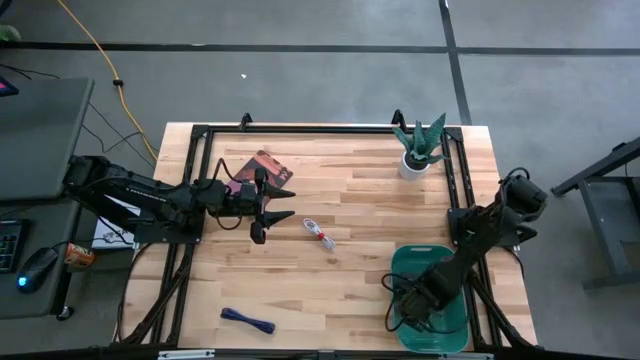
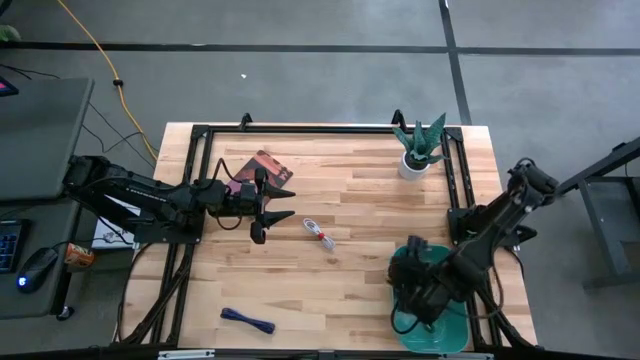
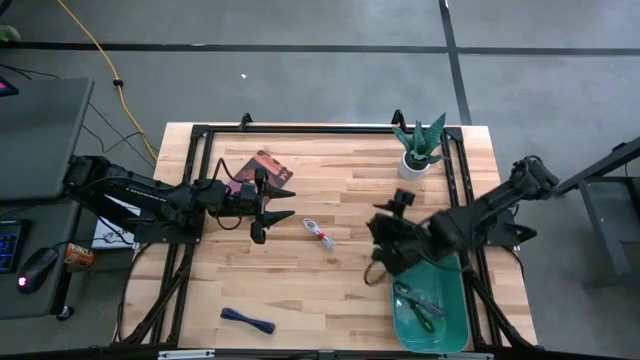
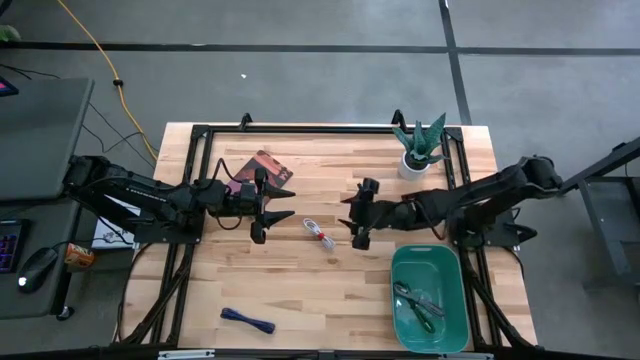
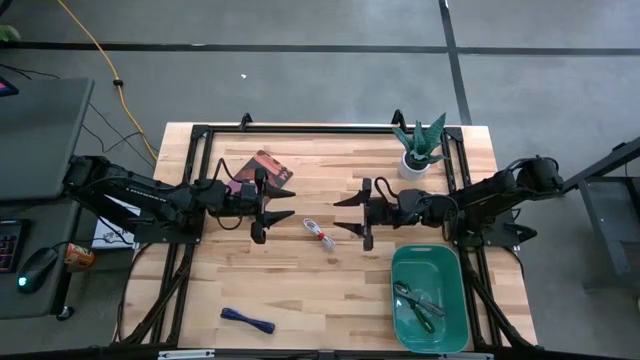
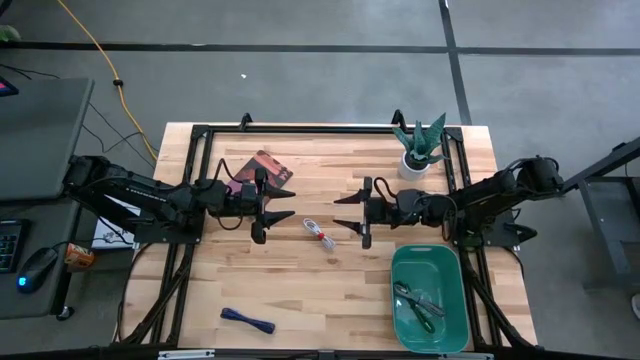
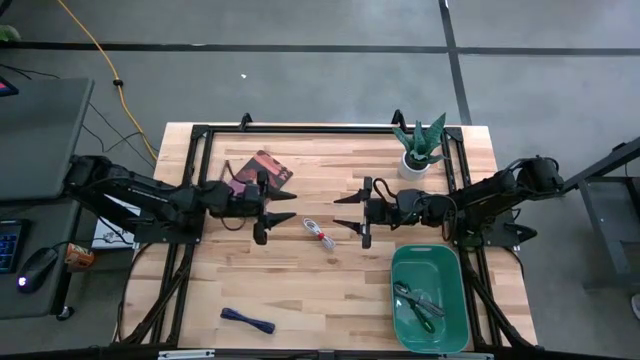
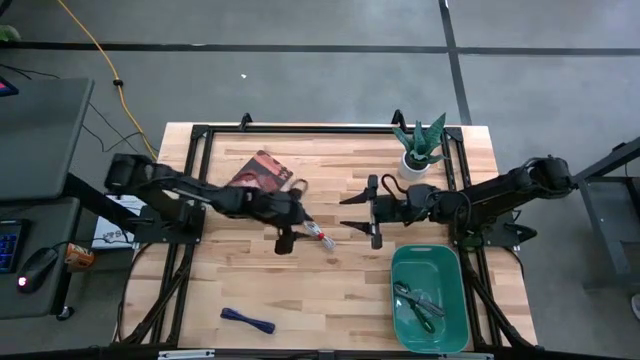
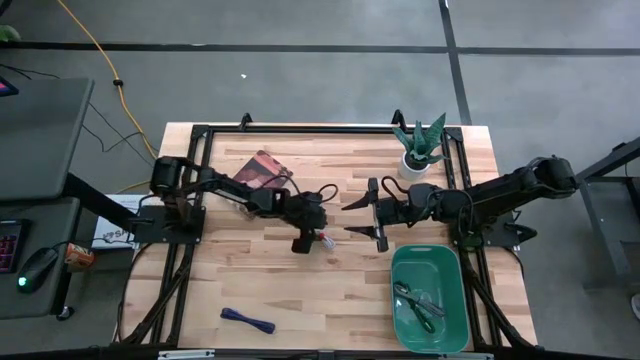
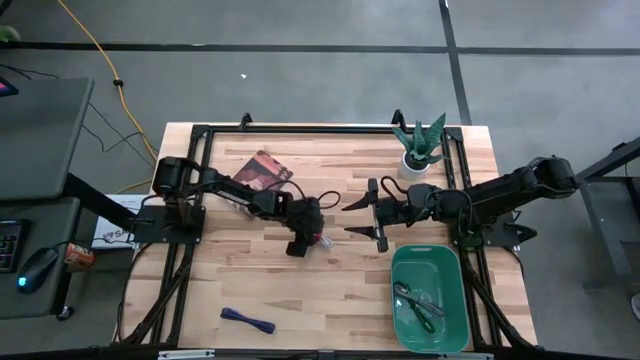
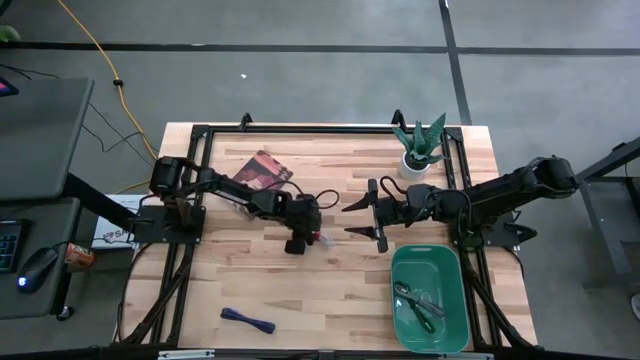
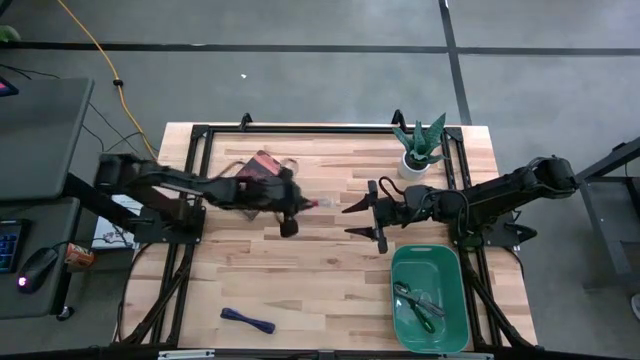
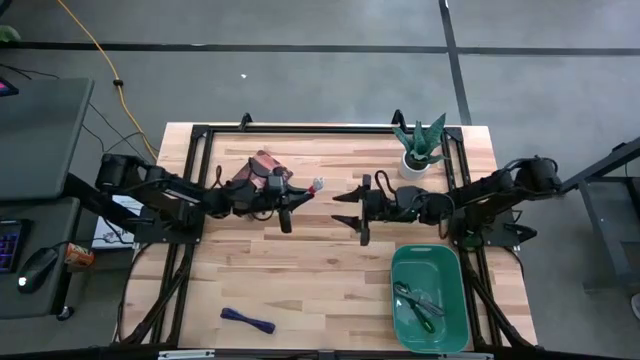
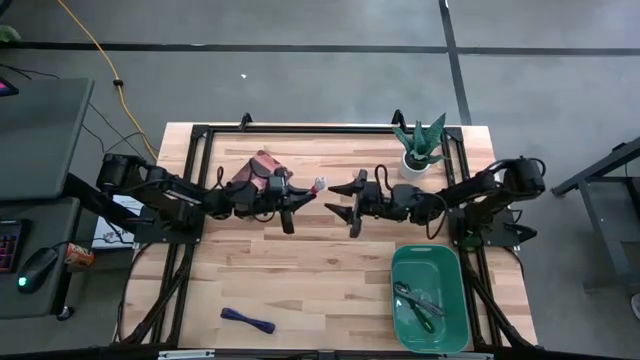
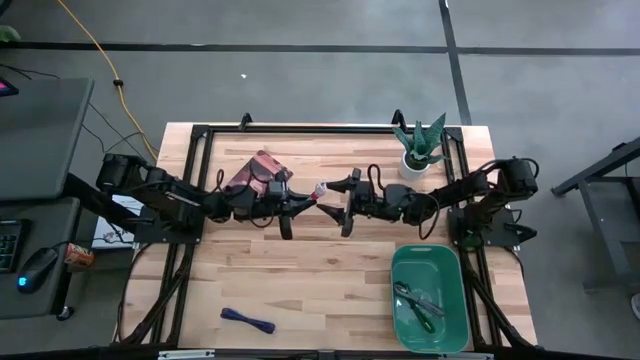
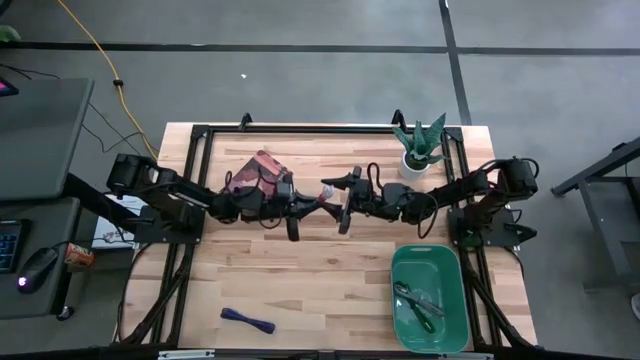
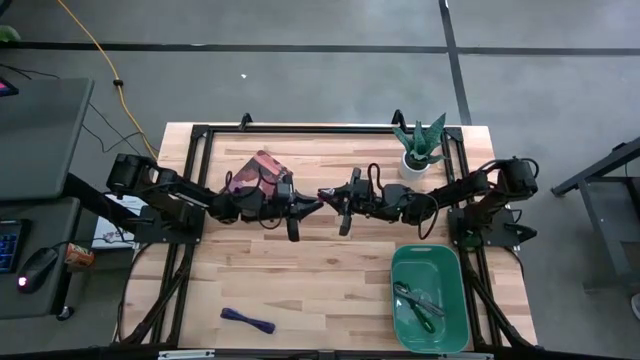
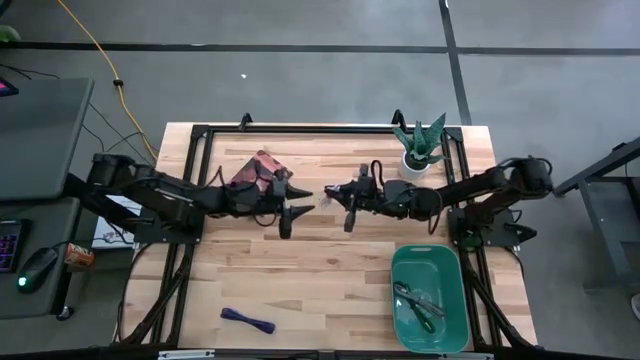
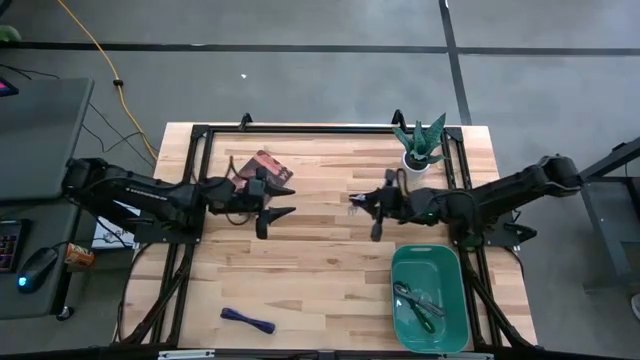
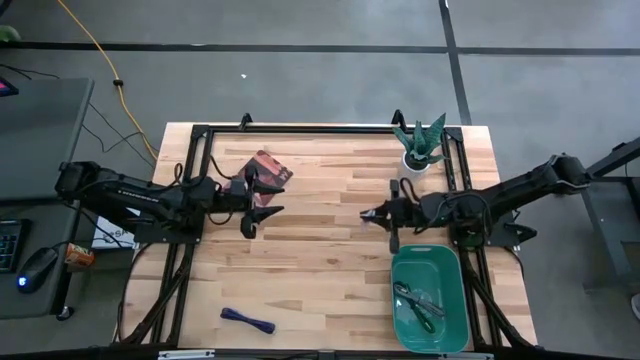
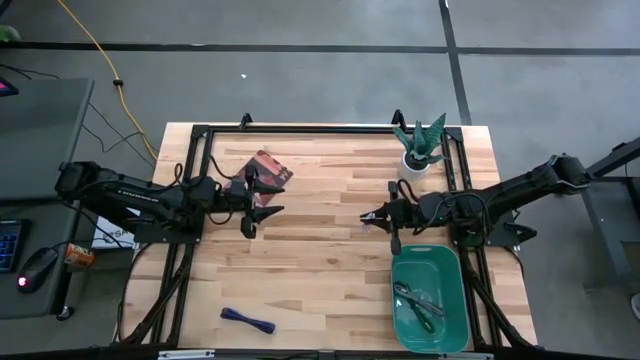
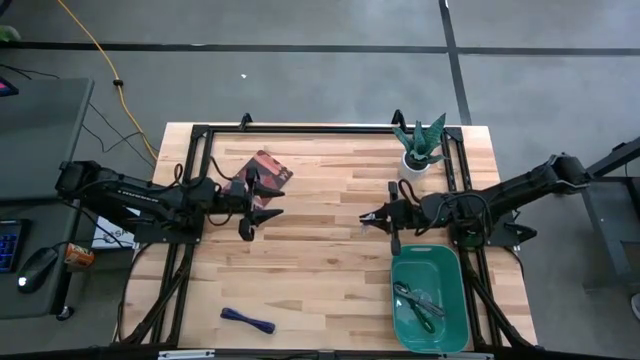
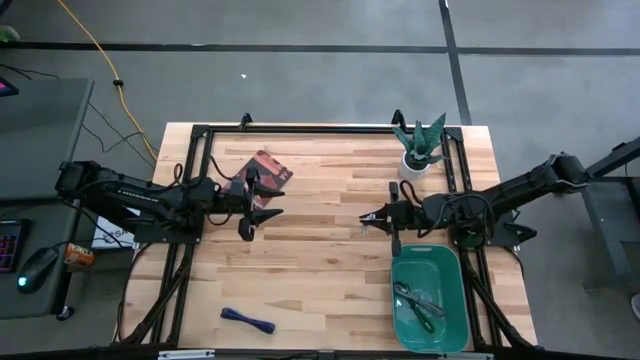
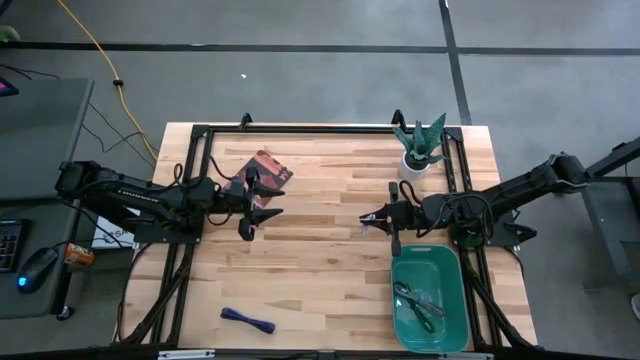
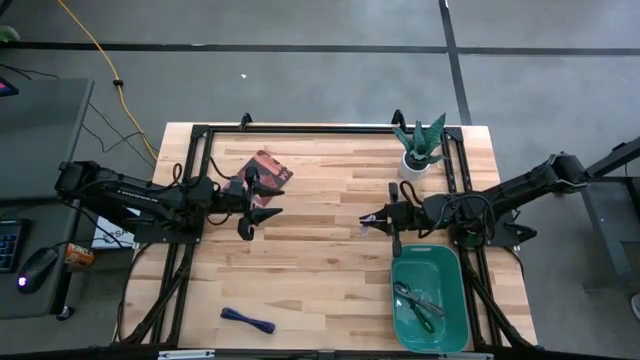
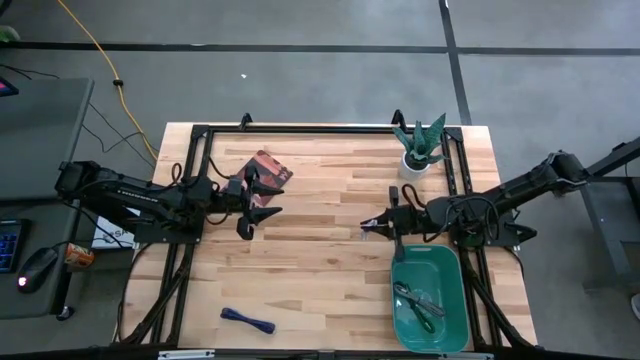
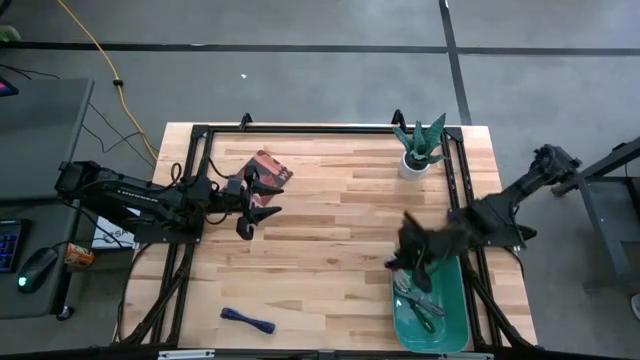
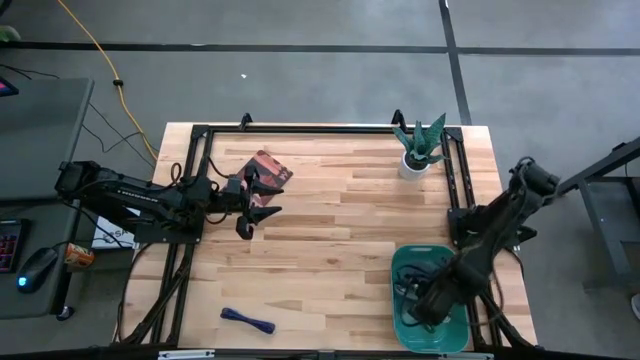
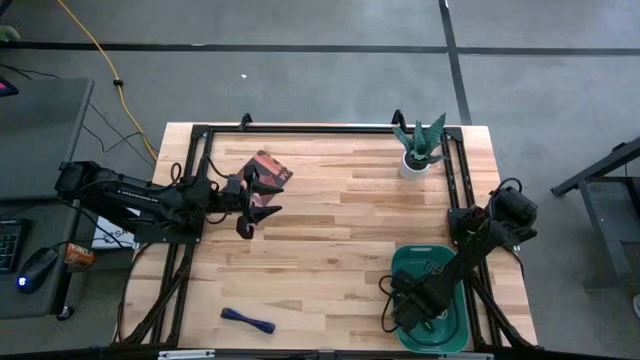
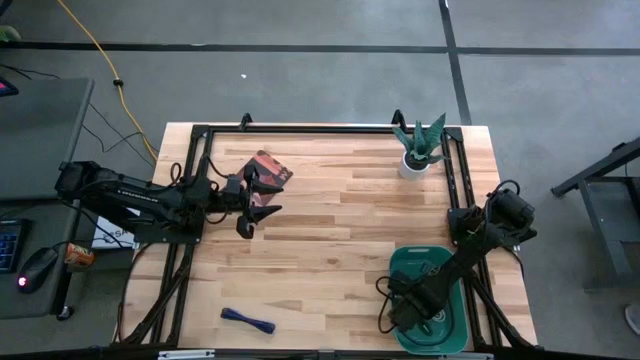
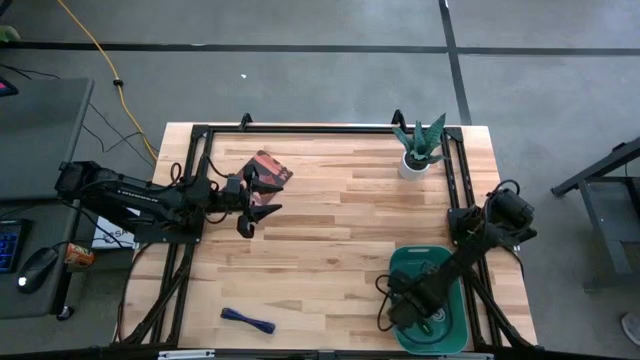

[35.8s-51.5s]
Task: Pick and place USB-C Cables
Put the white USB cable into the bin

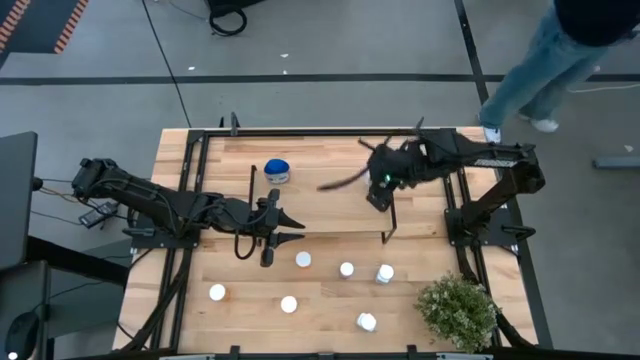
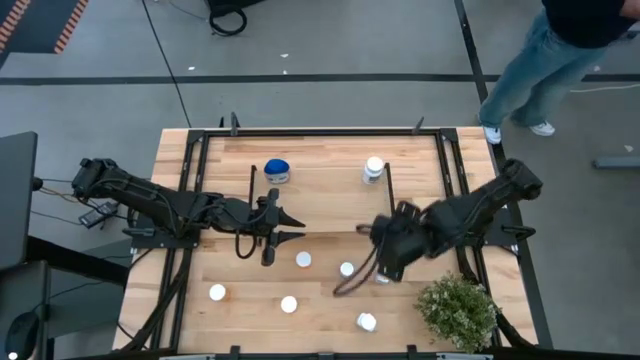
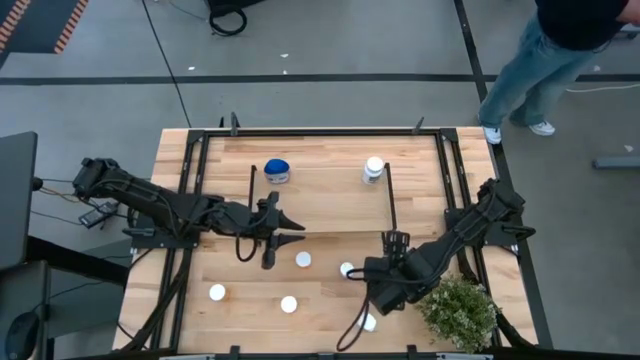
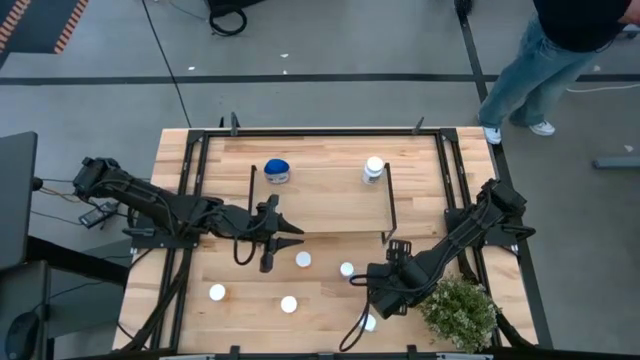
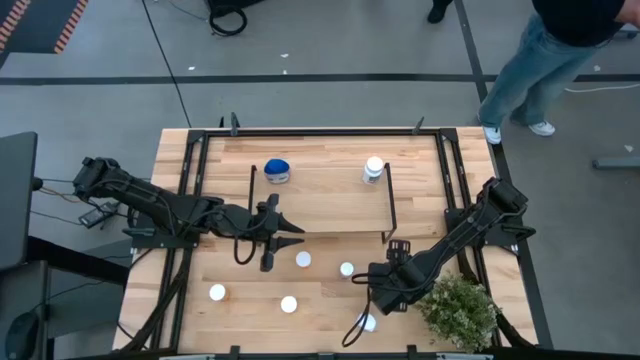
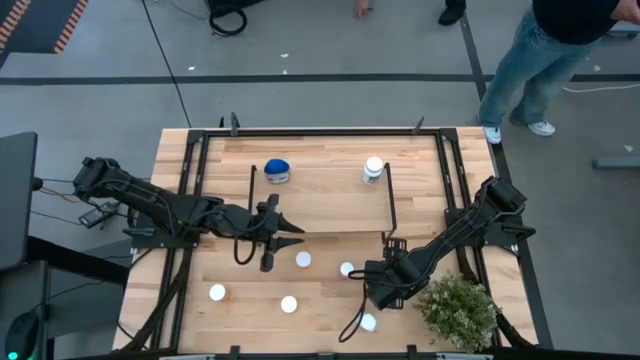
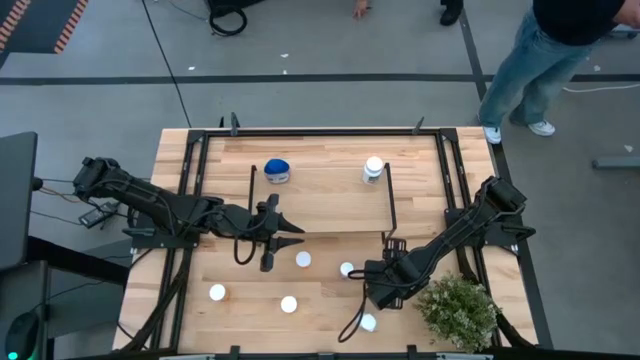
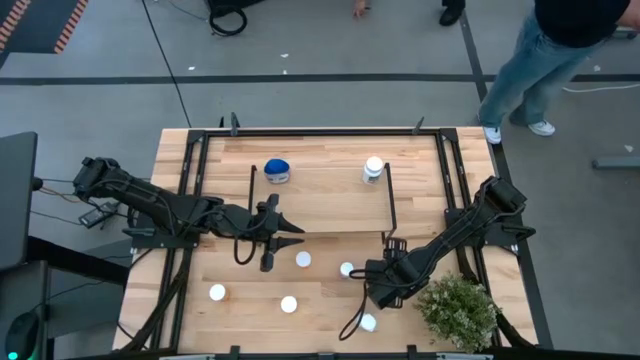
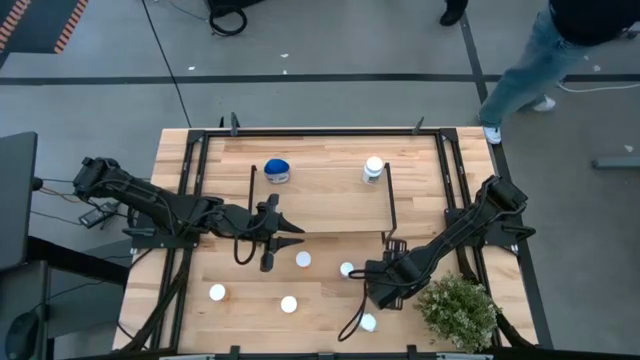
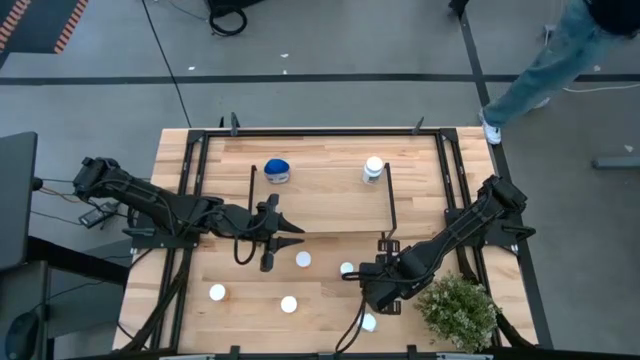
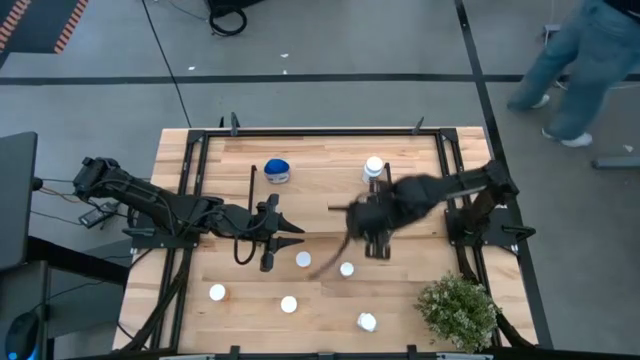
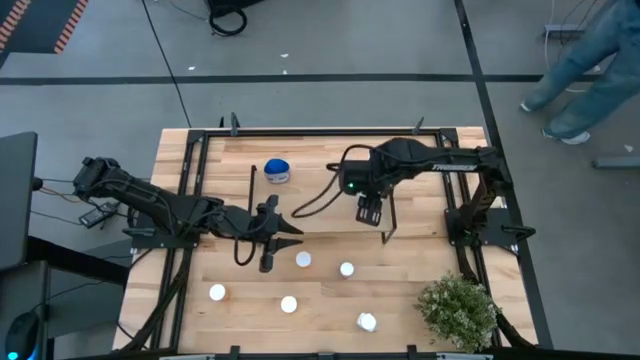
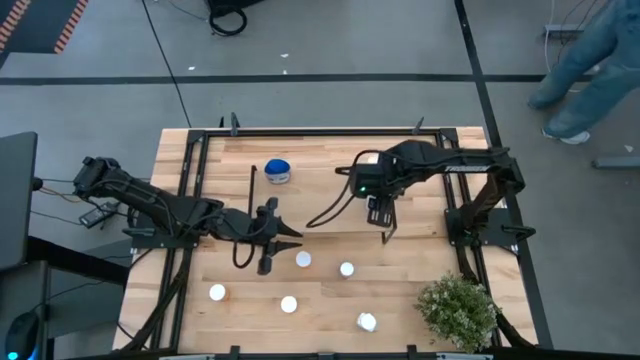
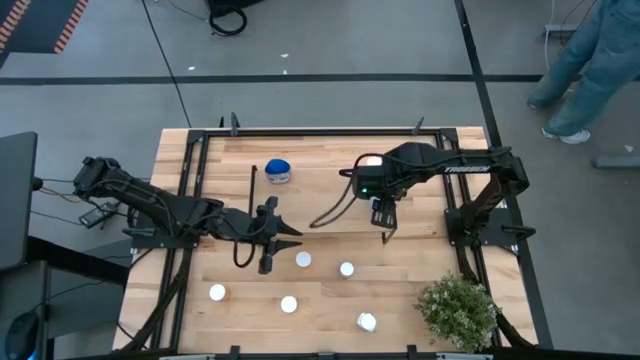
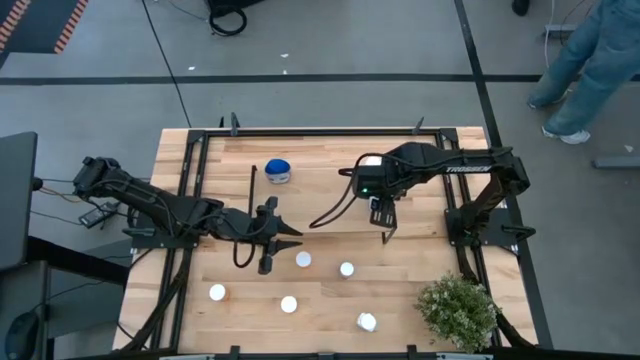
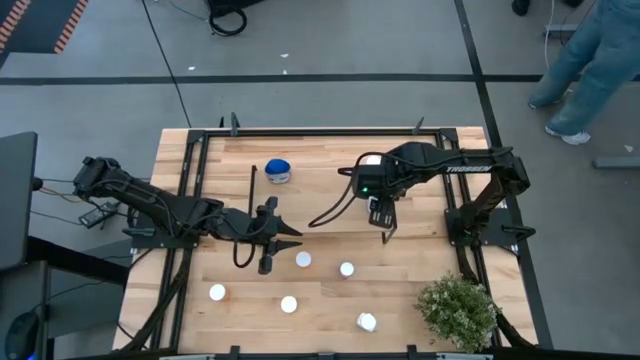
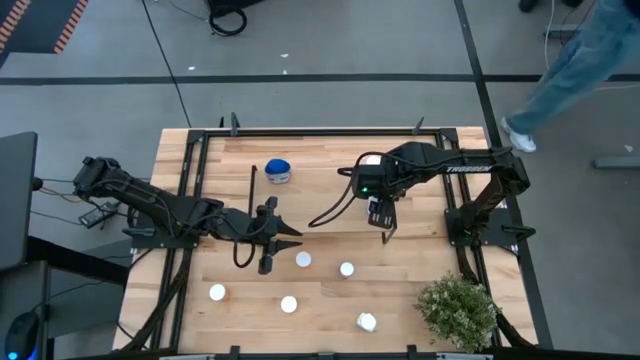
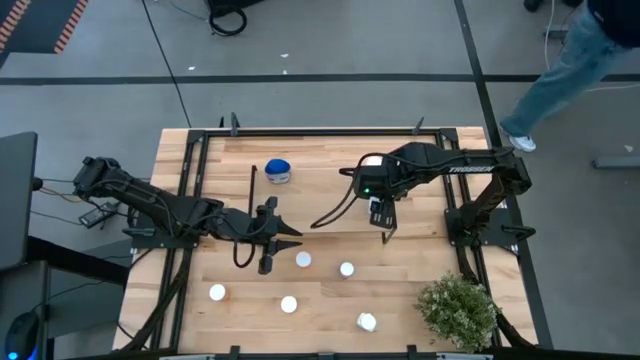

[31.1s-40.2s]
Task: Pick and place medicine bottles onto shelf by color
Put the blue and white medicine bottle on the shelf
